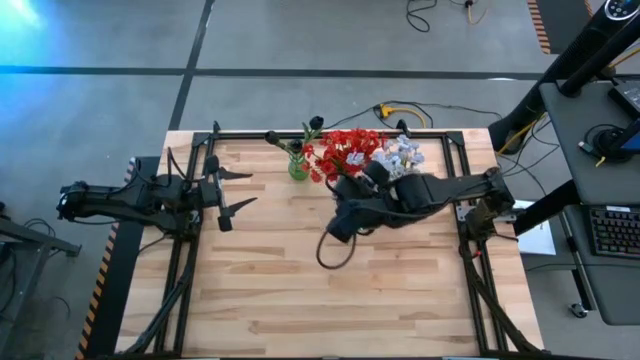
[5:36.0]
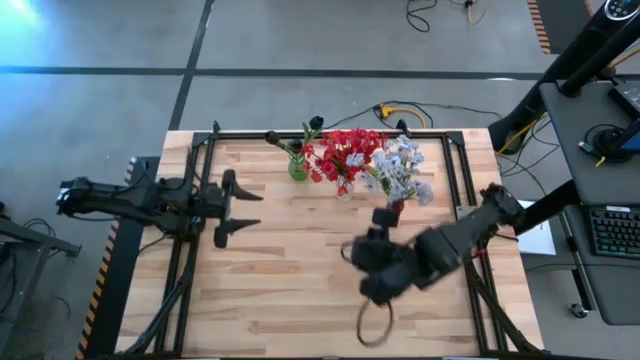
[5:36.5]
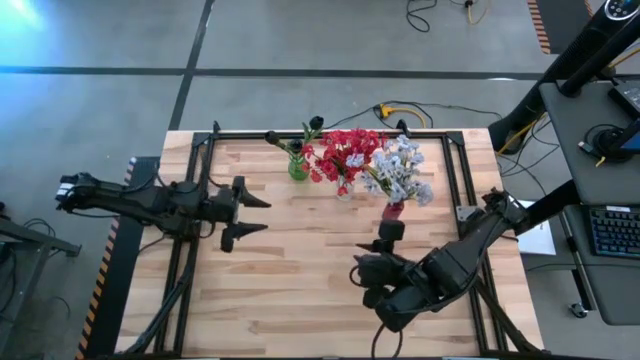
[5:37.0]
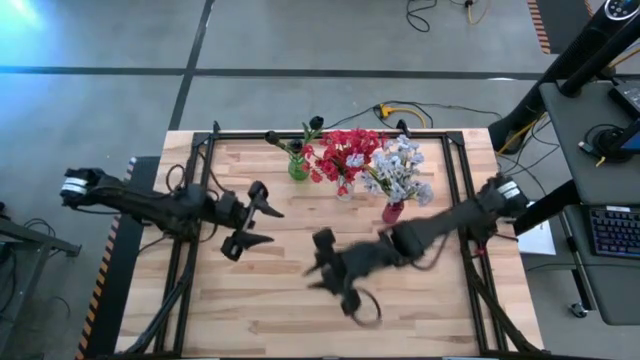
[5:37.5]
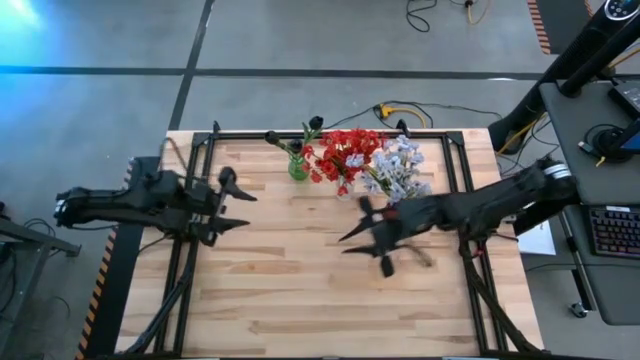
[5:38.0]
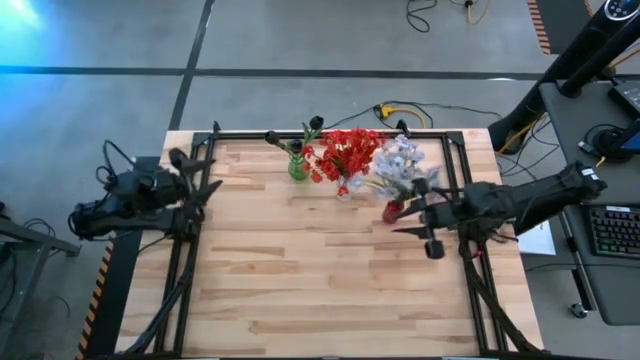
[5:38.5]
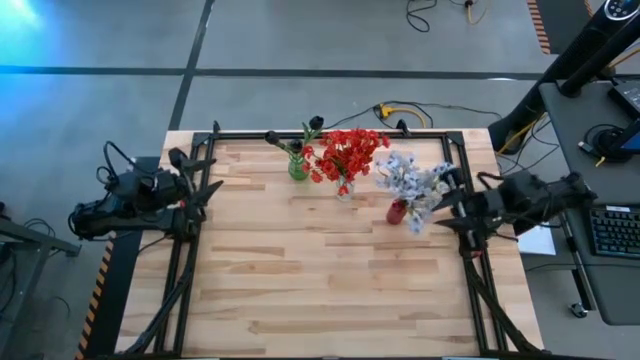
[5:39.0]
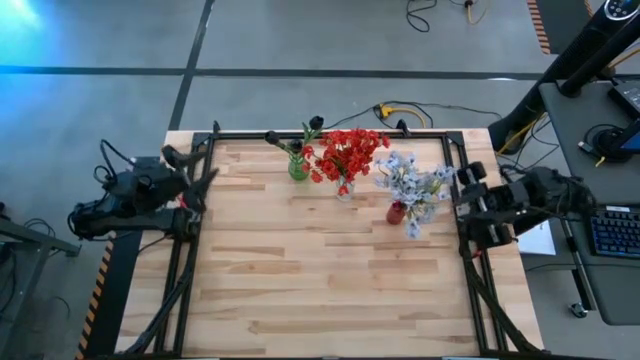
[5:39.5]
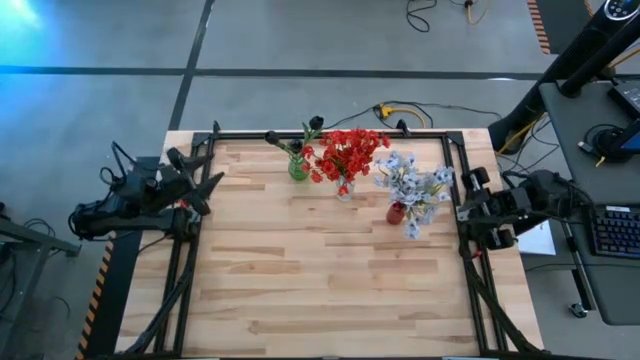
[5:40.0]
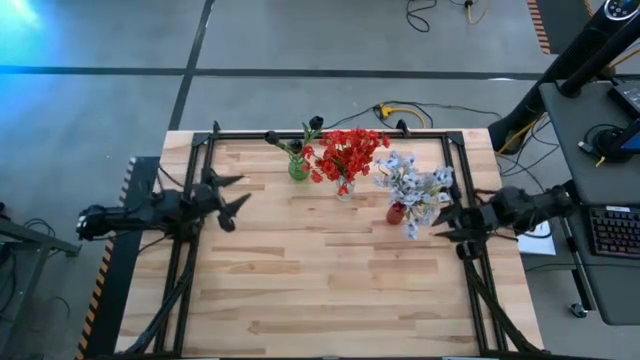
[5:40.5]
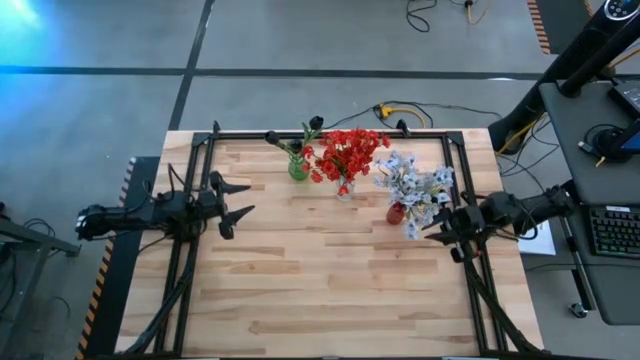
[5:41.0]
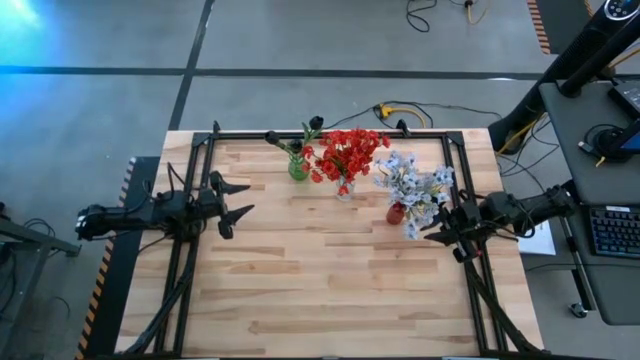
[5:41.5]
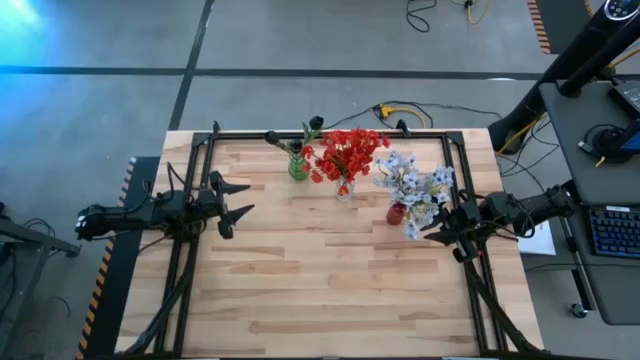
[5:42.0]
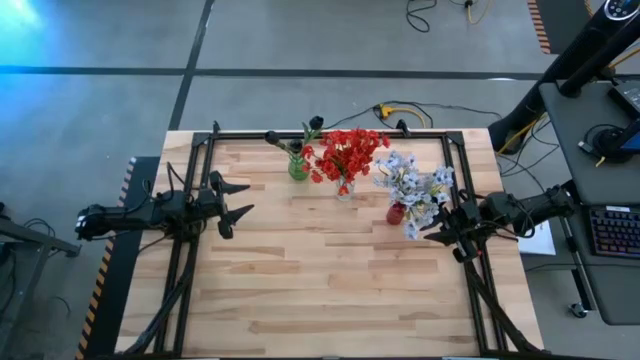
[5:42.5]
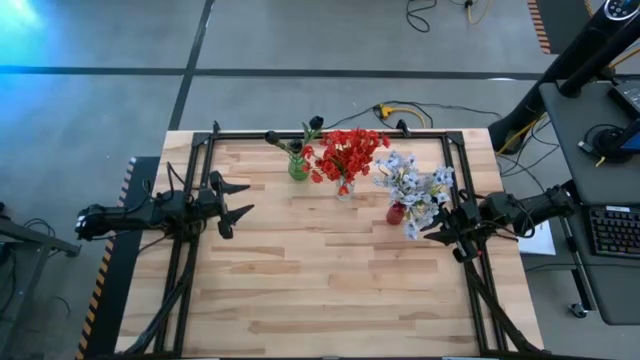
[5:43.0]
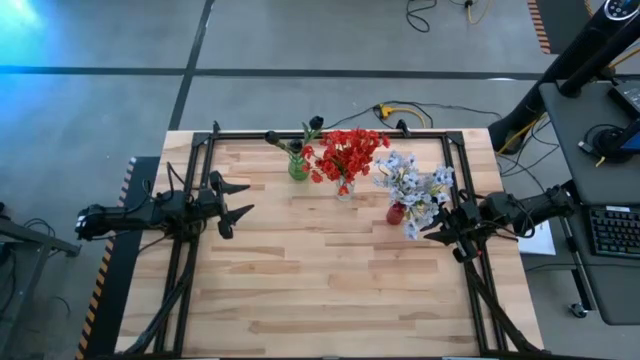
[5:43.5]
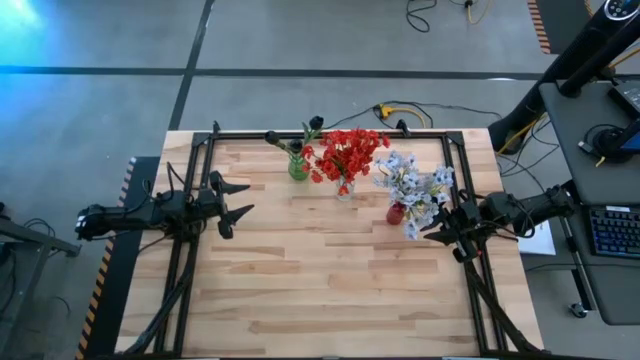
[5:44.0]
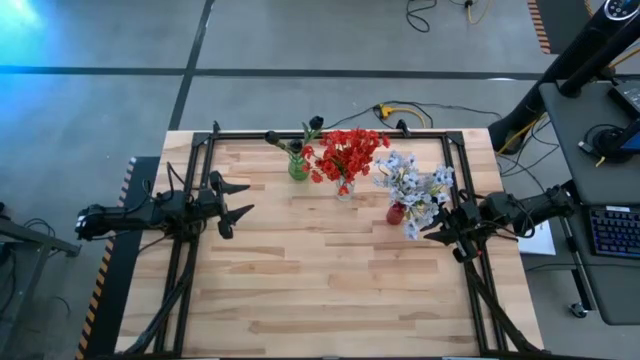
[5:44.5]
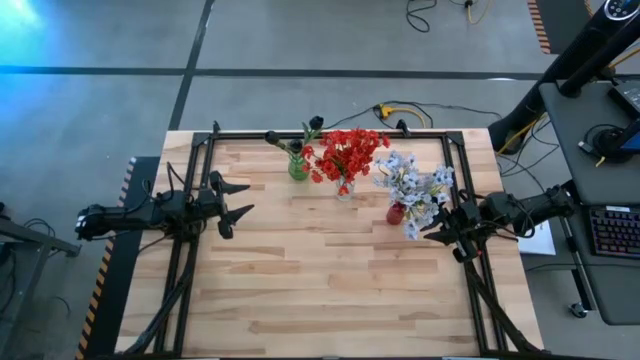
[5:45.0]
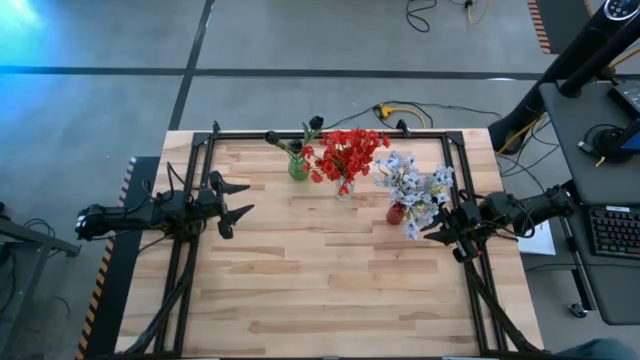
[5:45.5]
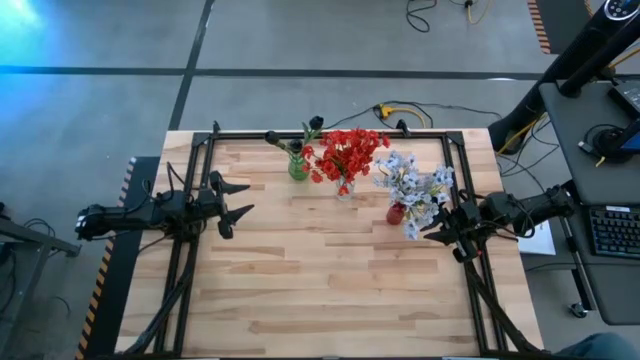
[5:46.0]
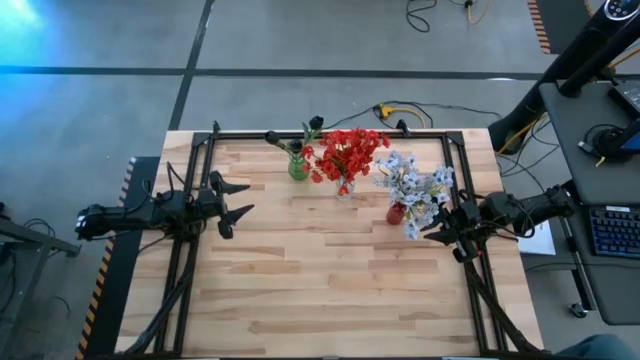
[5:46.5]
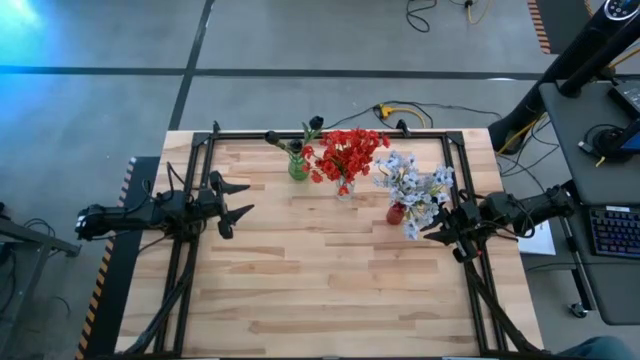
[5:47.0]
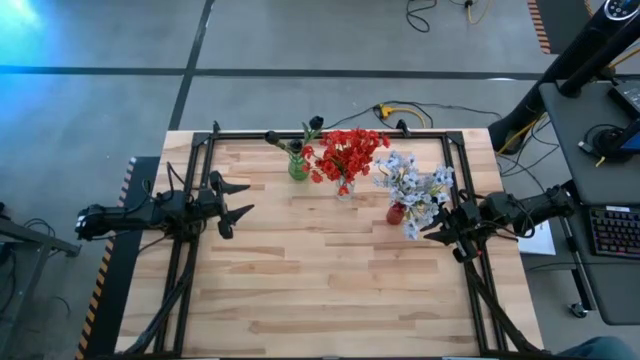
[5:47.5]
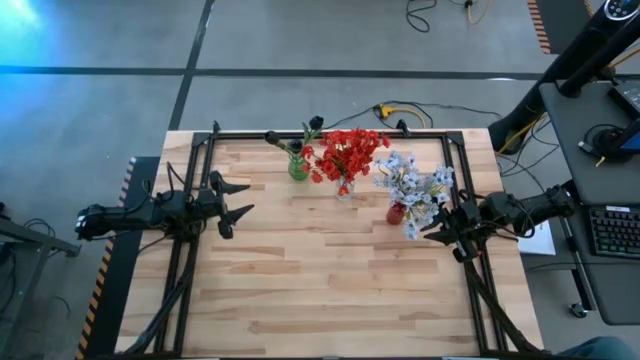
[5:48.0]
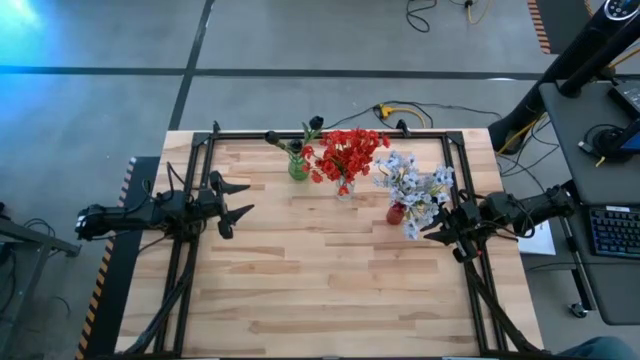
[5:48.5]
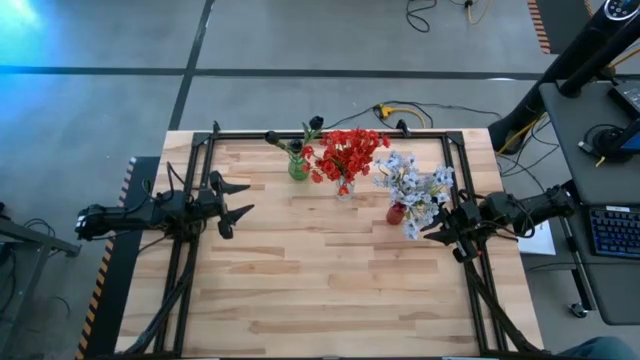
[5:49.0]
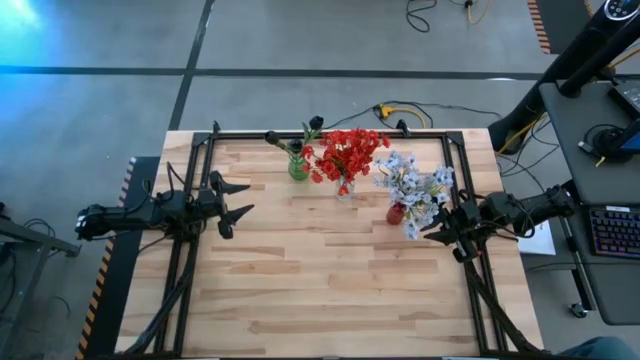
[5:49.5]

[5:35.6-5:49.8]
Task: Sort flowers into vase by color
Return to Home Position

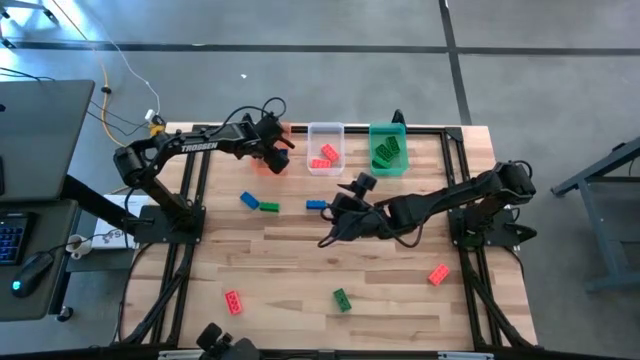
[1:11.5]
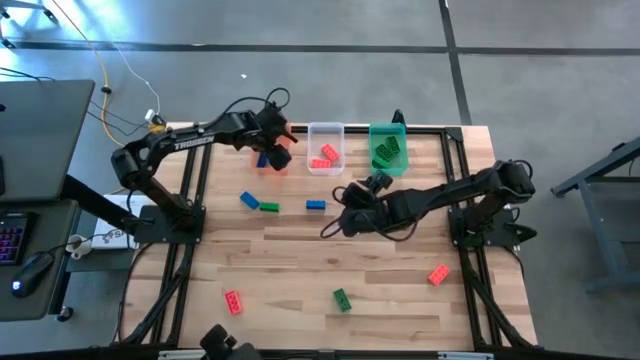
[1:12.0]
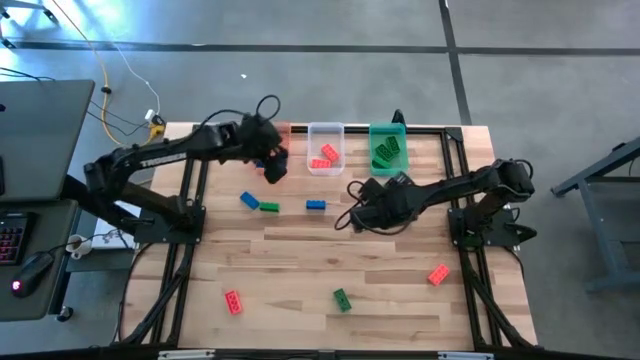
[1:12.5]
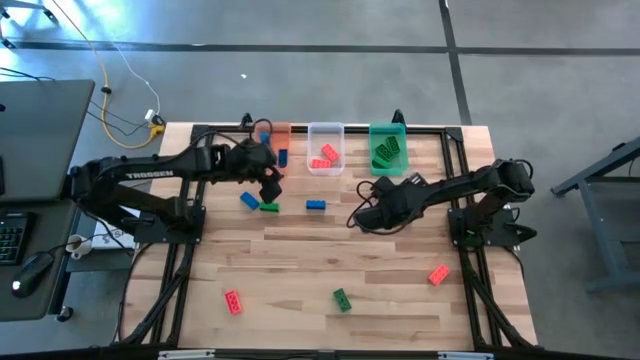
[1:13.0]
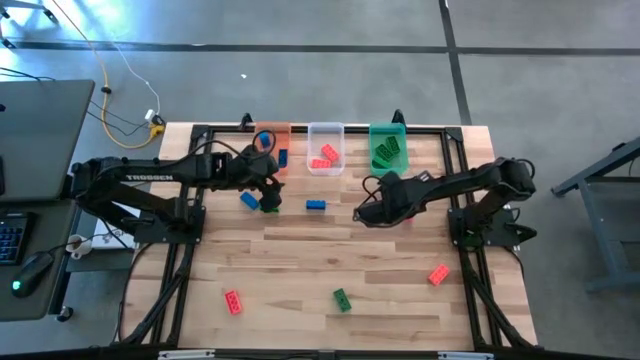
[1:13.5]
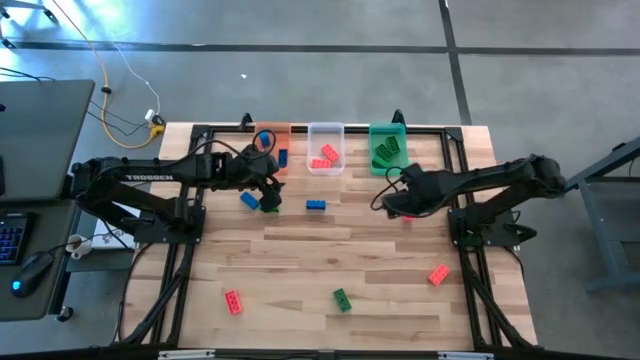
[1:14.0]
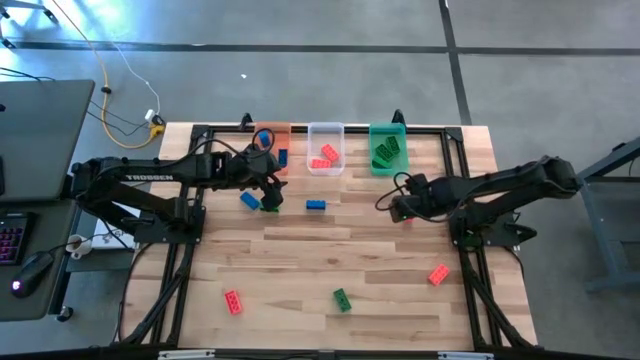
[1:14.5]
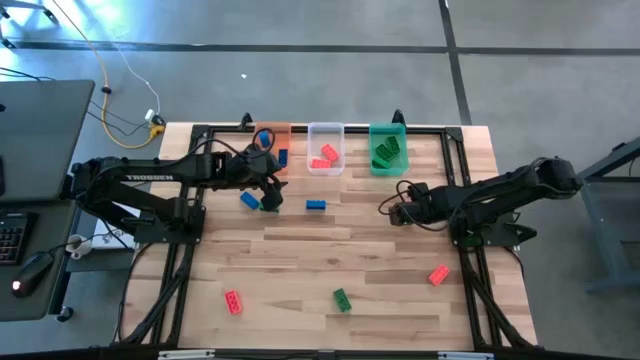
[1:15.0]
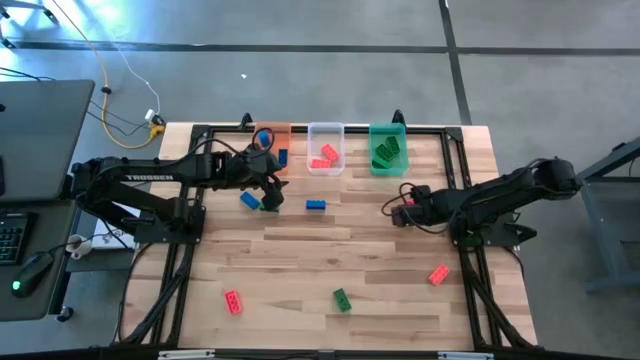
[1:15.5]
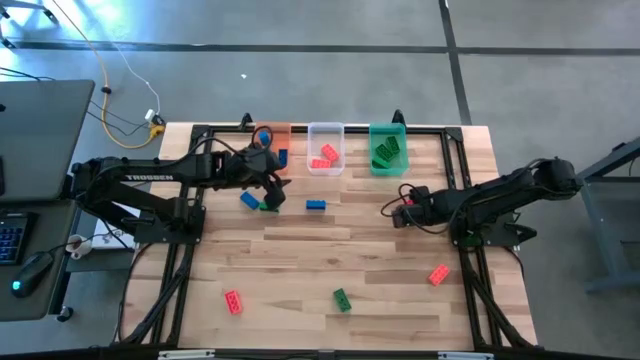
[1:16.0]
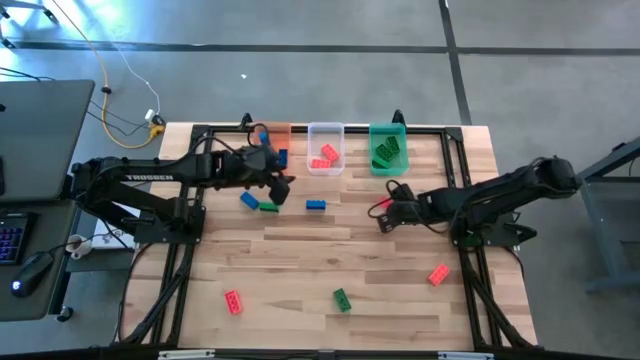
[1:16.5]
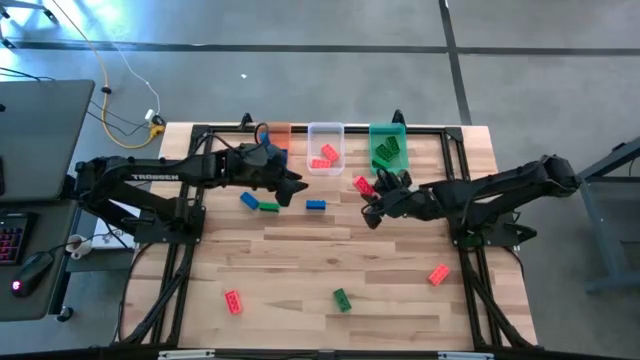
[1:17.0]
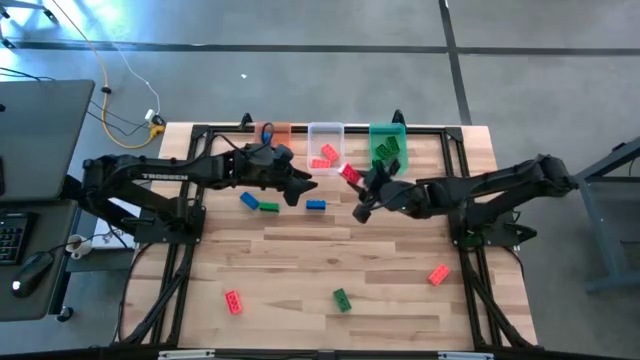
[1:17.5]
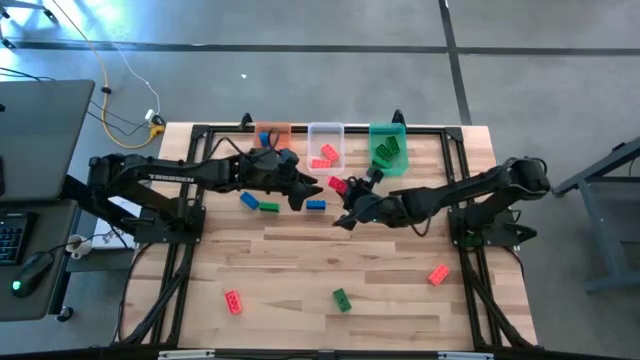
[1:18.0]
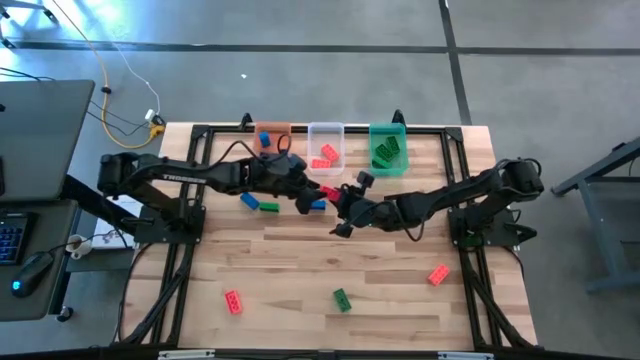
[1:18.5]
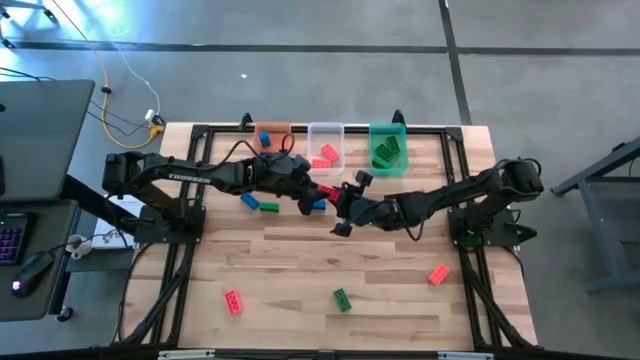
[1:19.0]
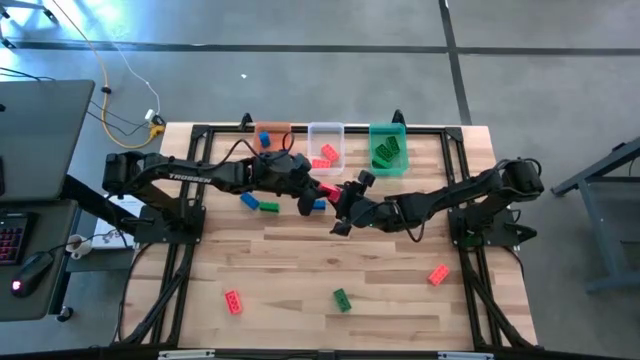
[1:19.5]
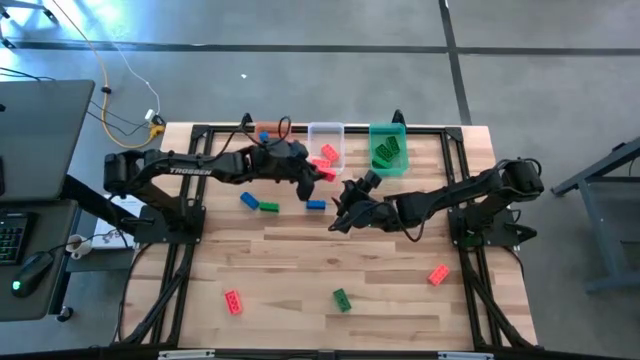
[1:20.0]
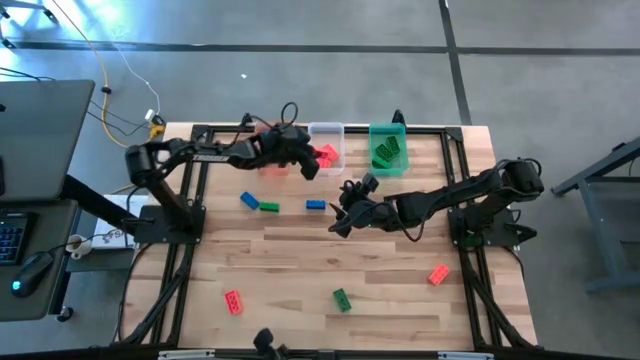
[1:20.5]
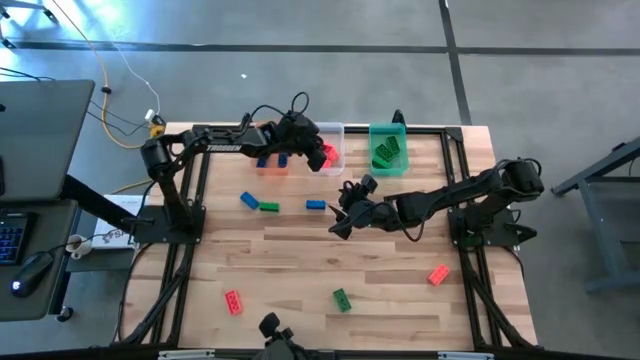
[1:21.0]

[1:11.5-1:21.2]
Task: Sort & place blocks by color
Put the orange game piece into the white bin
